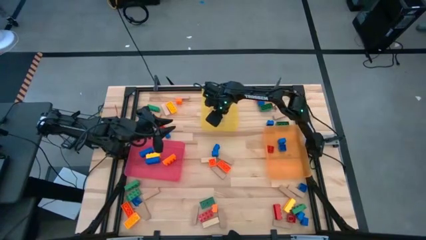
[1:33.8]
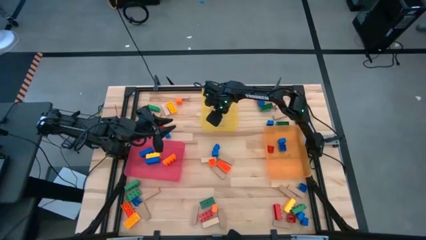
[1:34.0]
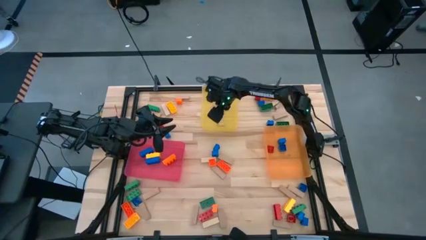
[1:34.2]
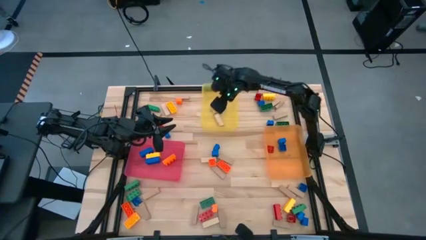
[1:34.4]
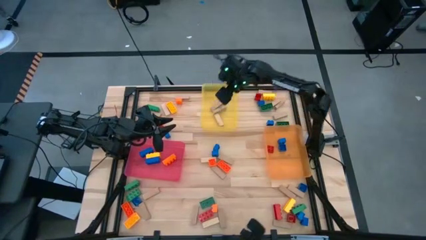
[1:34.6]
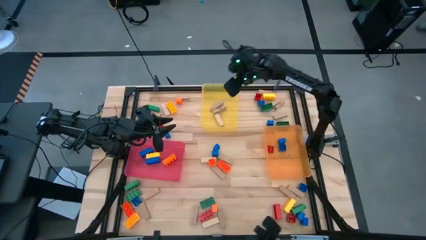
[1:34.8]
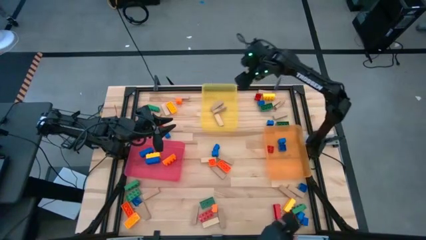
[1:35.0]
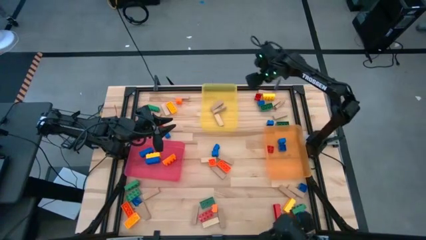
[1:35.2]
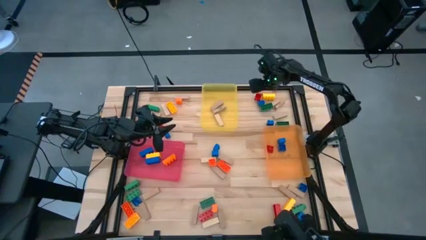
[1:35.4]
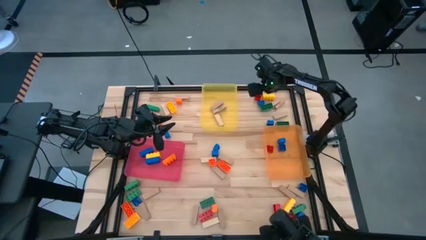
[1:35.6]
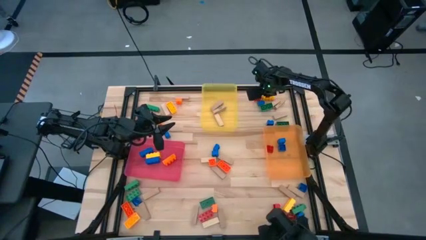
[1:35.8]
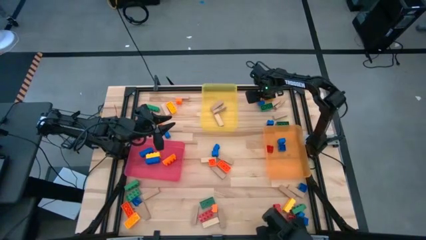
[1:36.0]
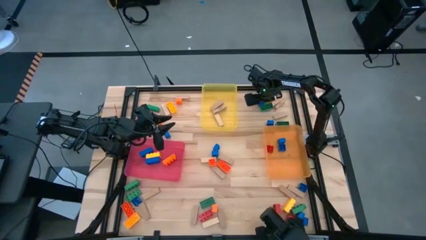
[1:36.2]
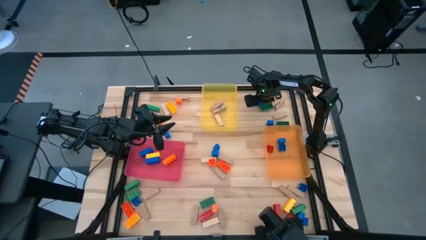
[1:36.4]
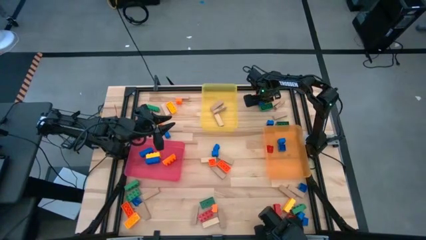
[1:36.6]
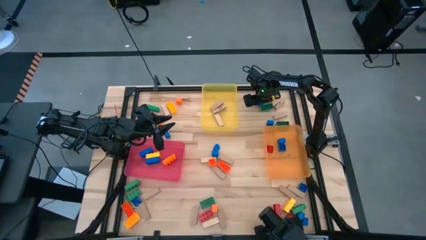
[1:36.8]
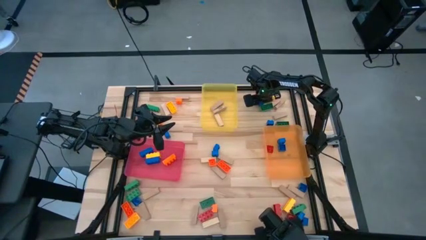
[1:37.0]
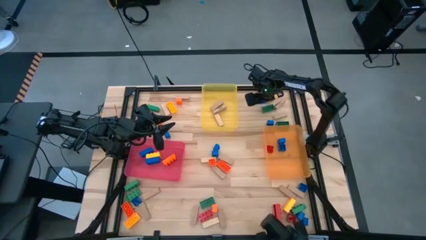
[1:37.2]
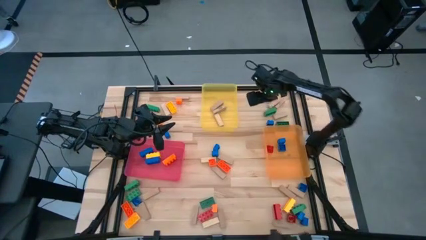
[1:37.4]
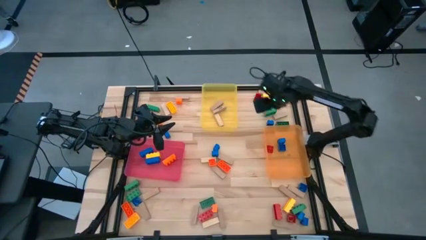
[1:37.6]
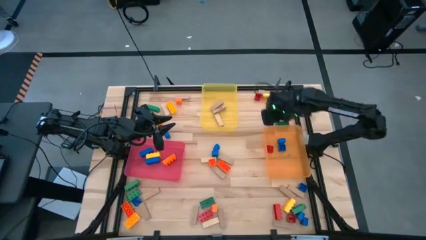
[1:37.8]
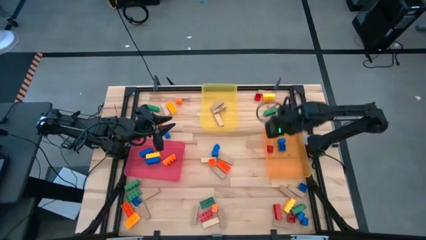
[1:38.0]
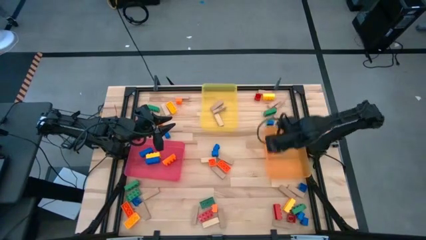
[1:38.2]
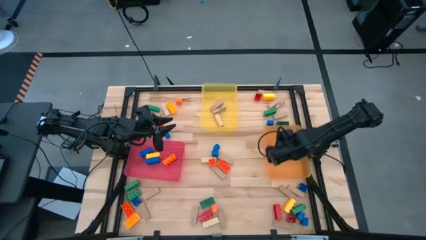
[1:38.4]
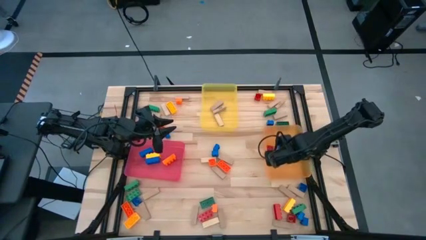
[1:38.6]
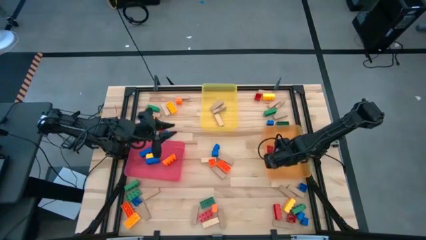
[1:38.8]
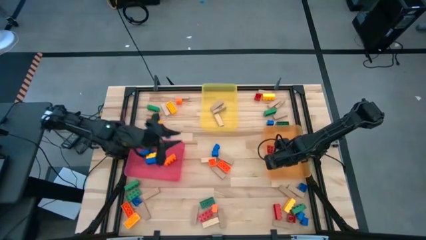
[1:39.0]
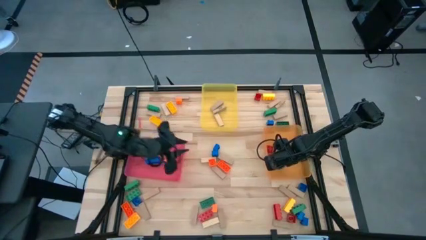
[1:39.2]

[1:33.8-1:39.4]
Task: Sort blocks by size
Put the 1 stud blue game piece into the orange bin

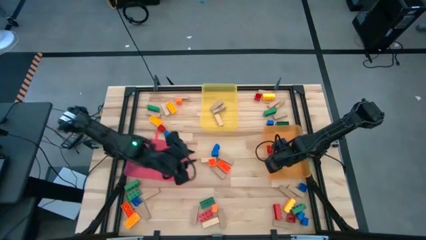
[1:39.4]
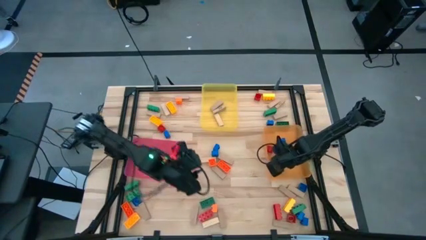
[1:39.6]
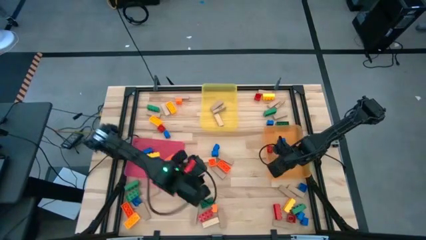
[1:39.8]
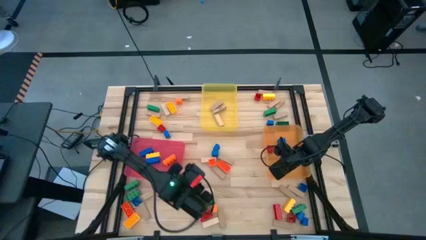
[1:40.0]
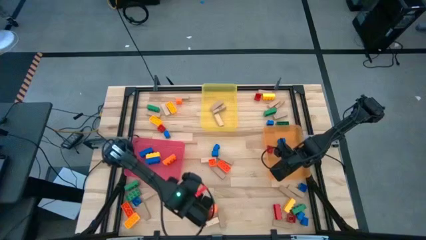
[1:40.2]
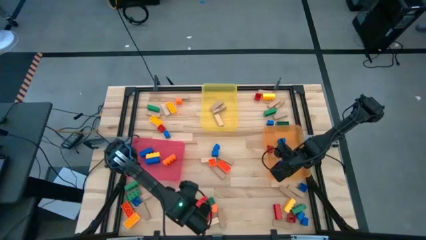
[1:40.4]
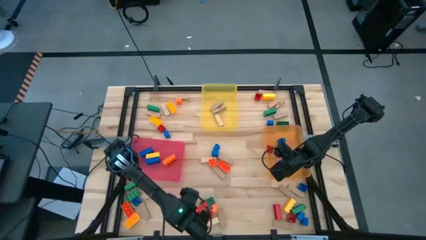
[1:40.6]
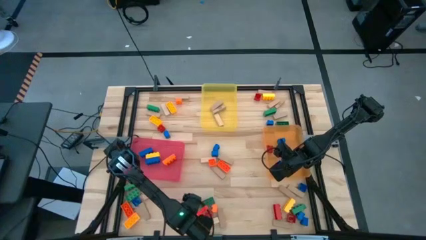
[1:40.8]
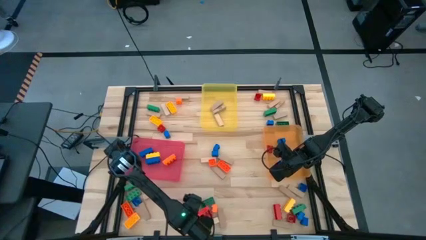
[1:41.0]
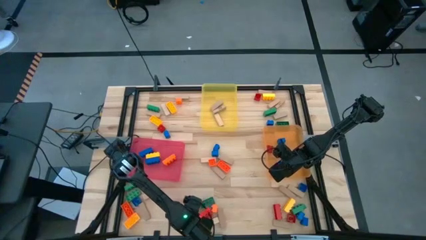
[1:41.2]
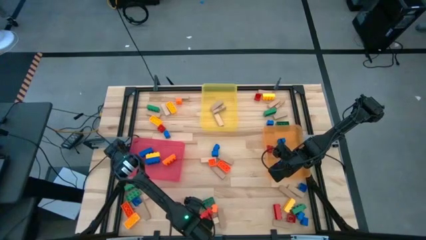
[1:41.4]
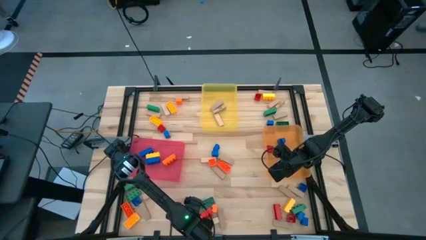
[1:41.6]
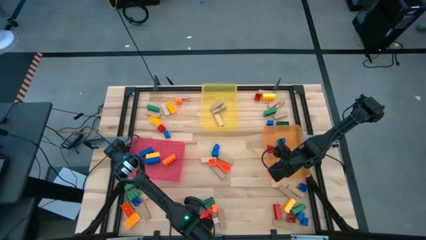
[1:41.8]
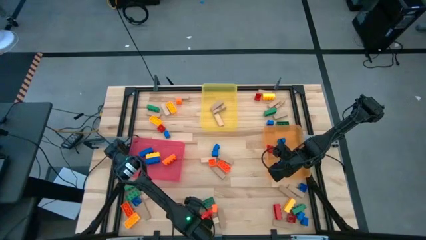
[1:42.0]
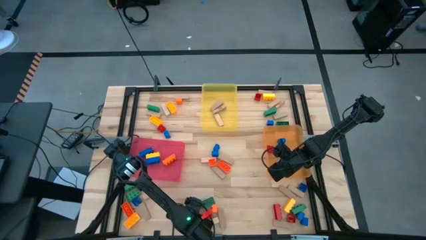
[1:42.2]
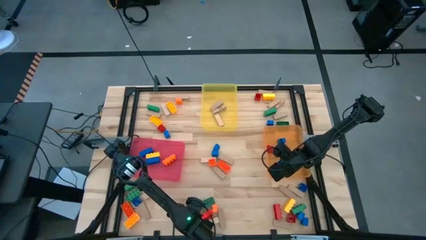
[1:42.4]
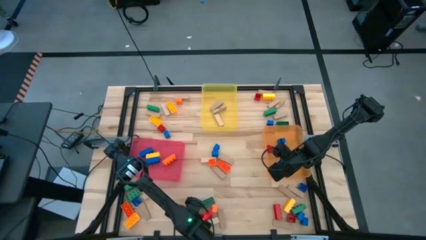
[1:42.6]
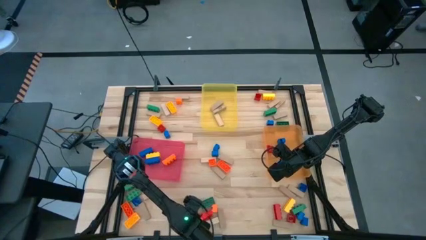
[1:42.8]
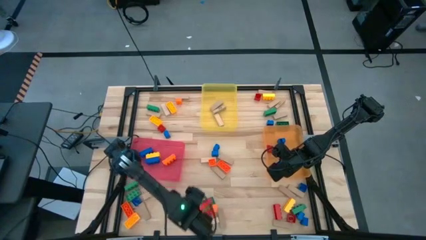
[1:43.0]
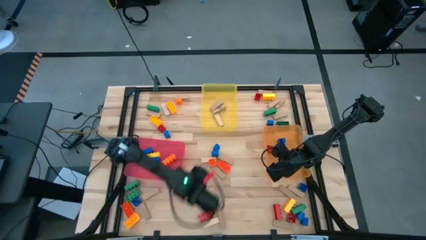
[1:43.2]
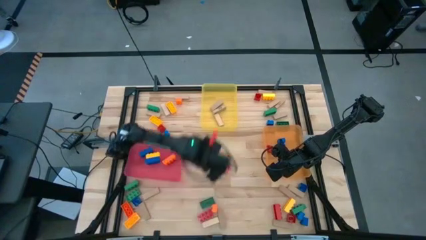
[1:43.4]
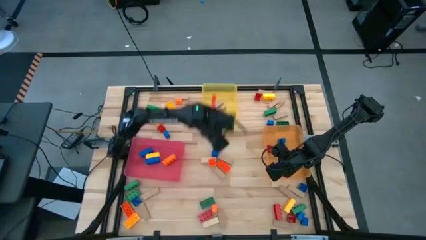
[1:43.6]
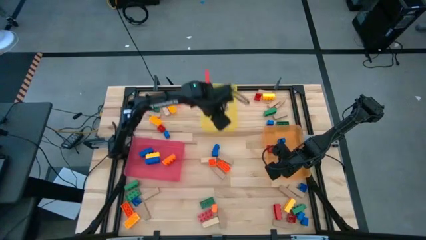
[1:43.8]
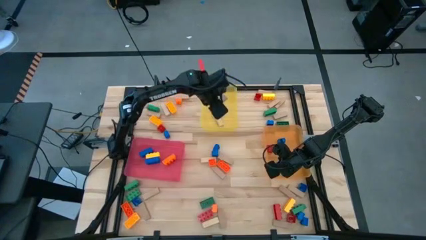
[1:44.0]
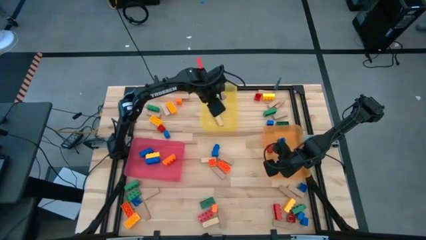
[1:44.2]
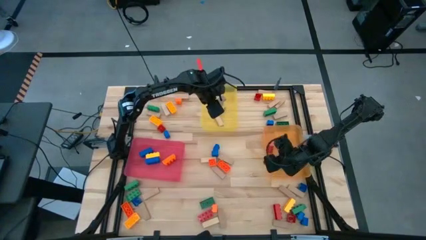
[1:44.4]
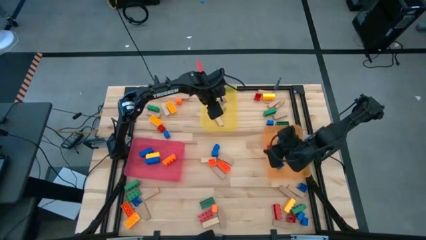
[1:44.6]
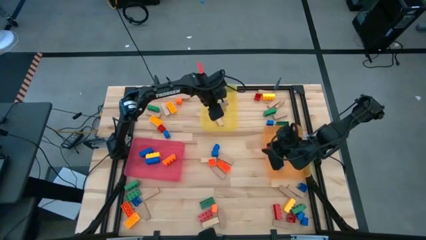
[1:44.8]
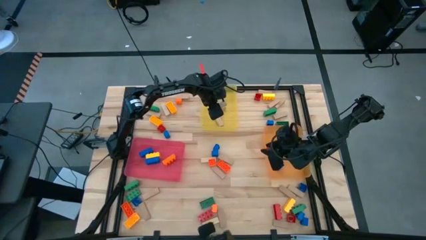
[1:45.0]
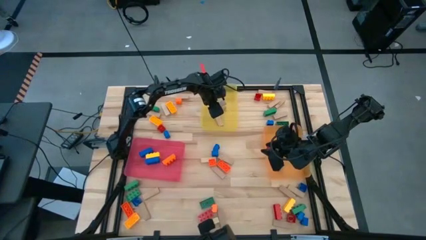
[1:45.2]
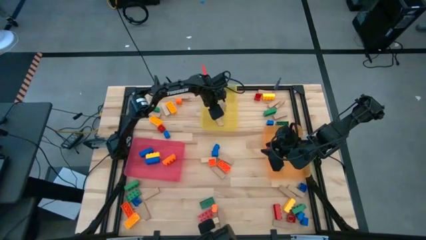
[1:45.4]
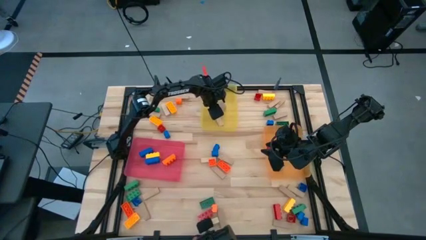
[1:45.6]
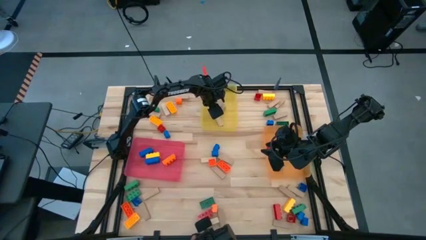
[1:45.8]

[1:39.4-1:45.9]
Put the wooden block into the yellow bin
